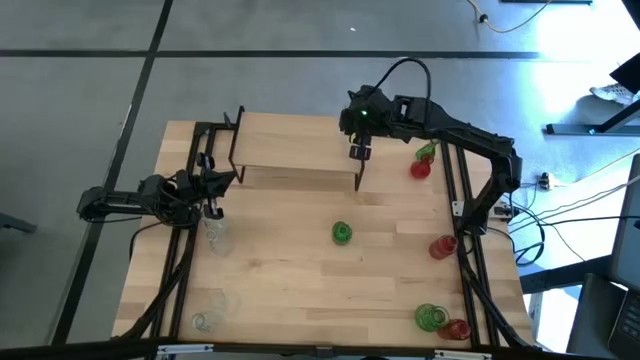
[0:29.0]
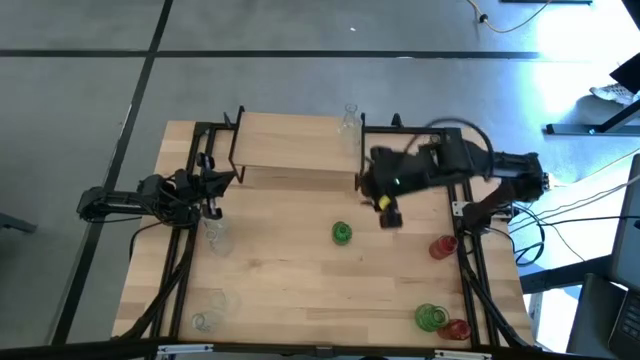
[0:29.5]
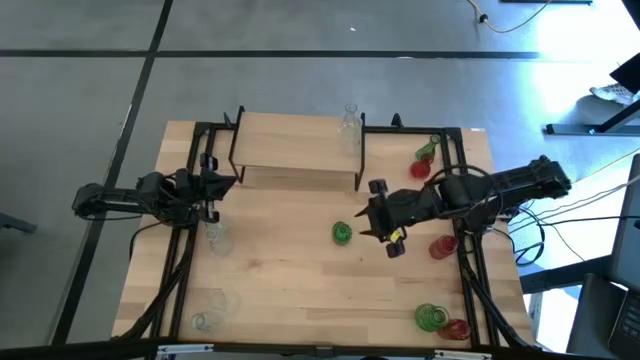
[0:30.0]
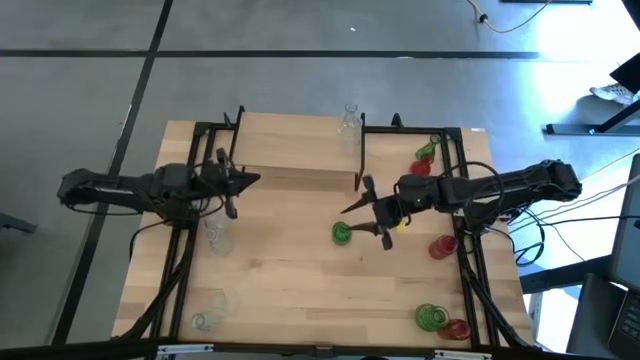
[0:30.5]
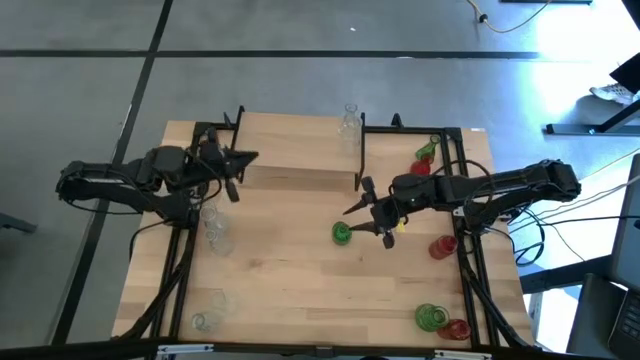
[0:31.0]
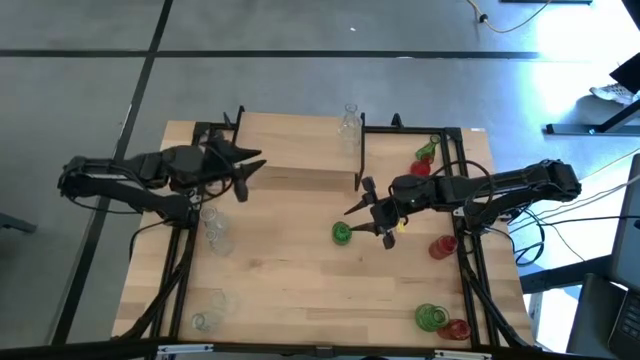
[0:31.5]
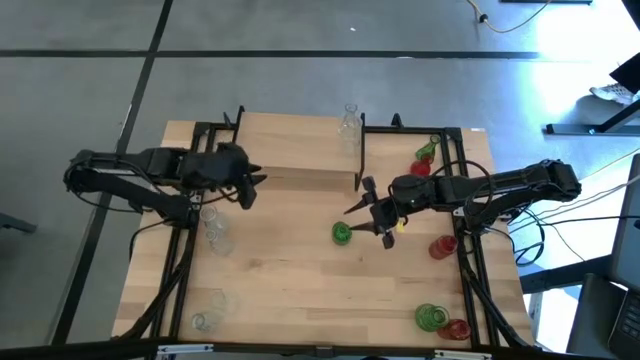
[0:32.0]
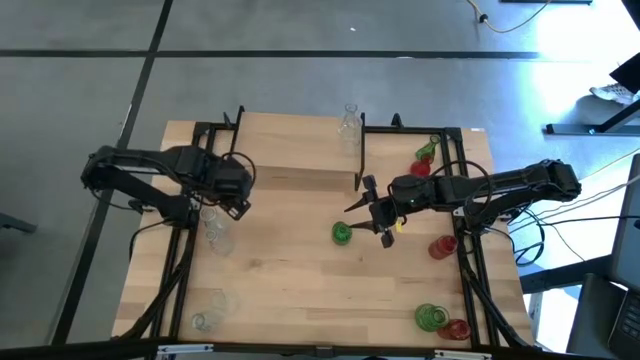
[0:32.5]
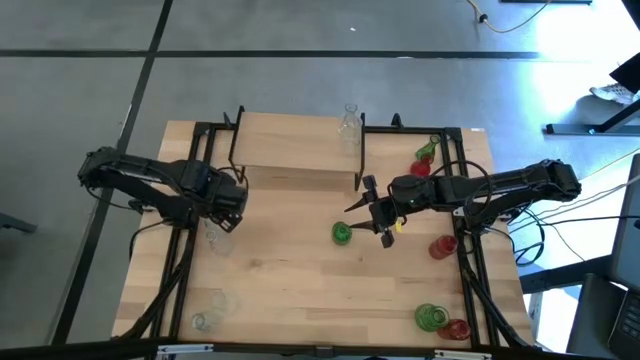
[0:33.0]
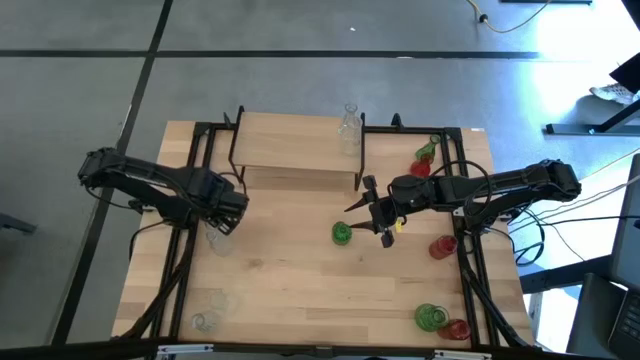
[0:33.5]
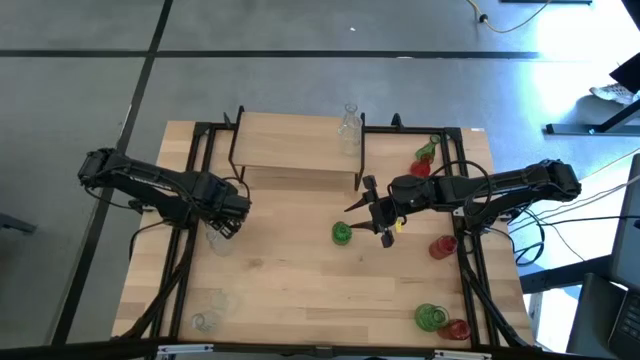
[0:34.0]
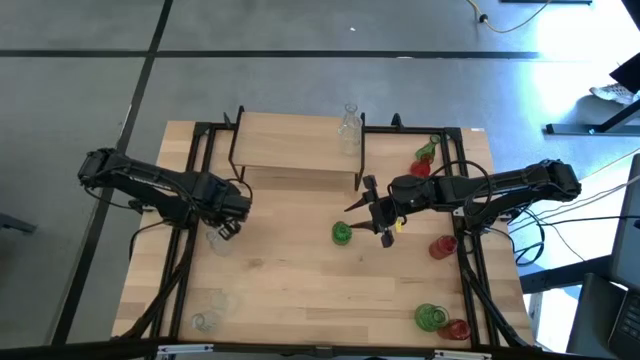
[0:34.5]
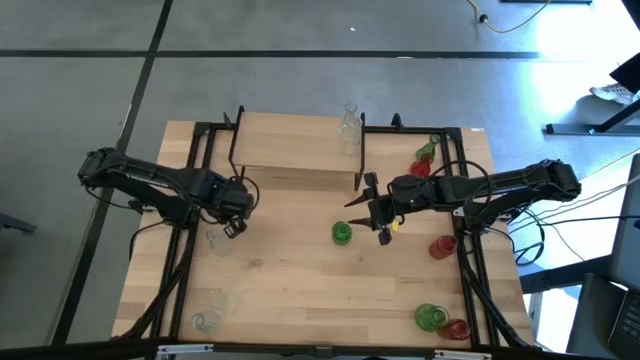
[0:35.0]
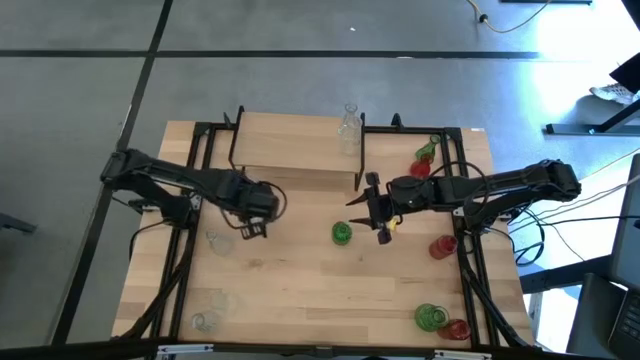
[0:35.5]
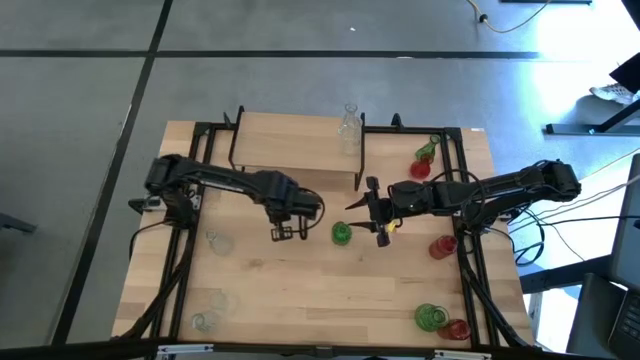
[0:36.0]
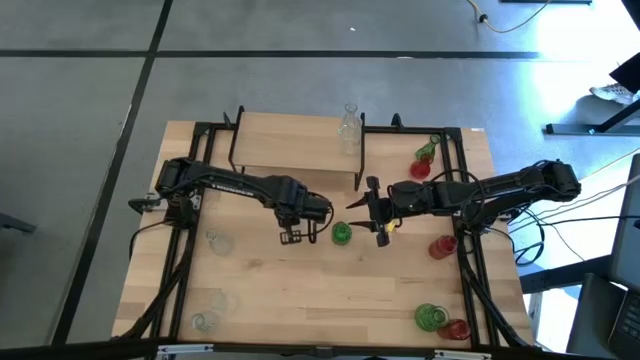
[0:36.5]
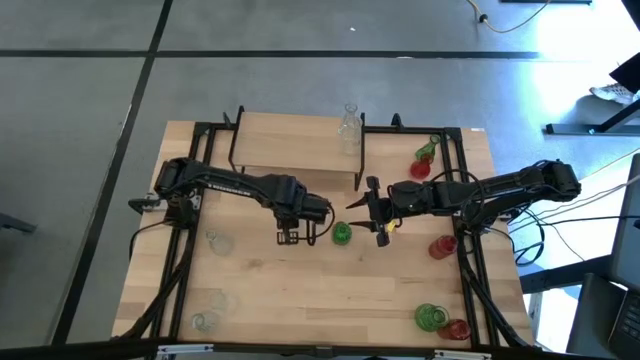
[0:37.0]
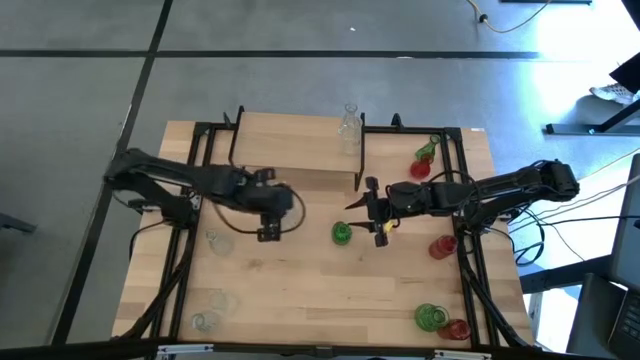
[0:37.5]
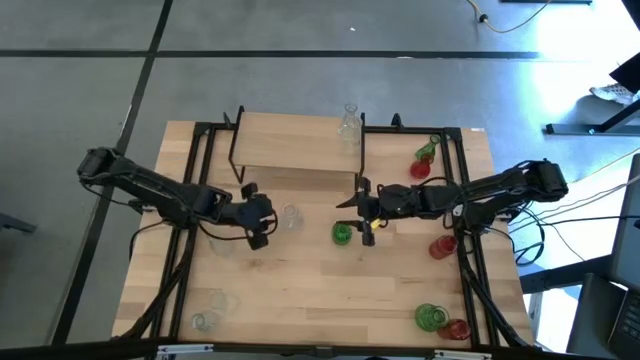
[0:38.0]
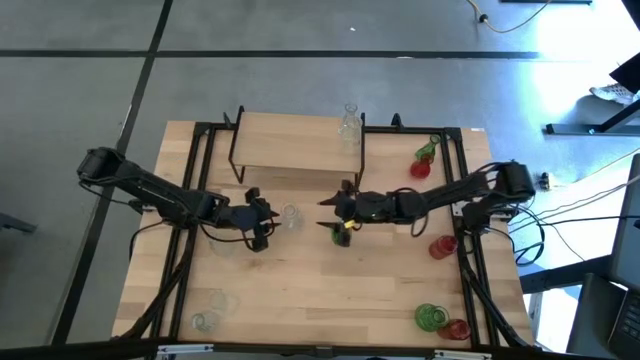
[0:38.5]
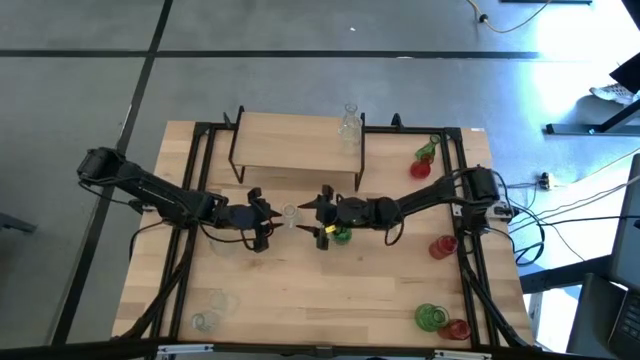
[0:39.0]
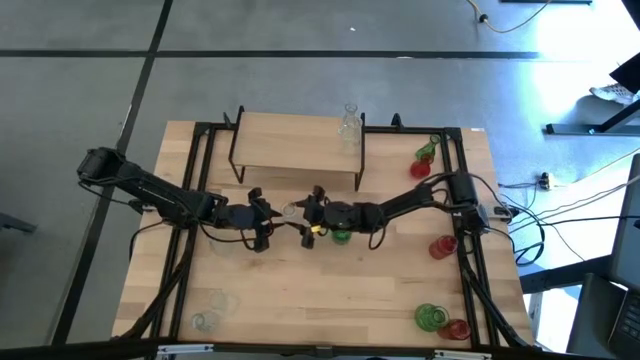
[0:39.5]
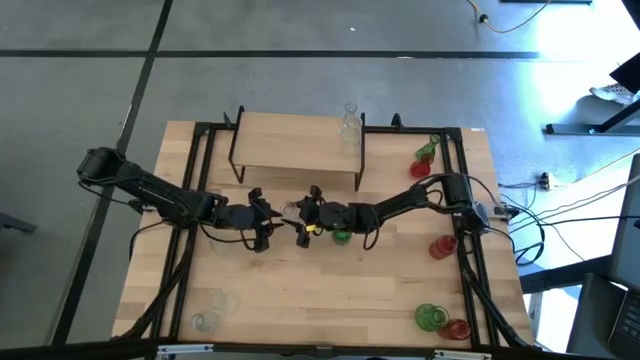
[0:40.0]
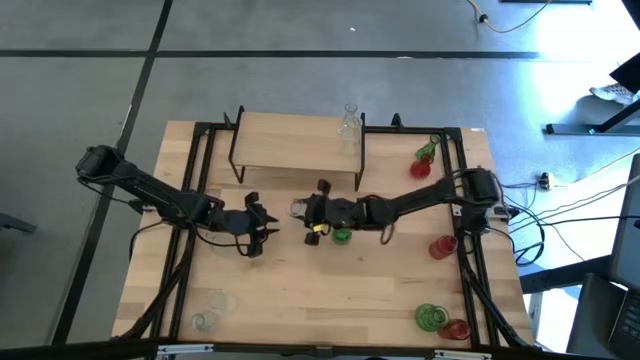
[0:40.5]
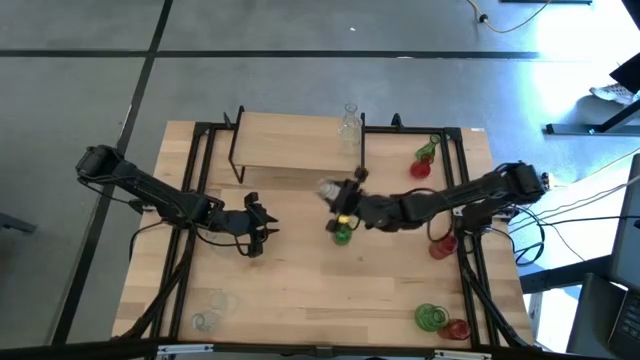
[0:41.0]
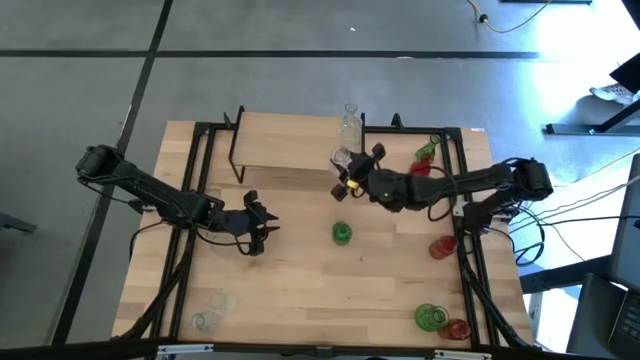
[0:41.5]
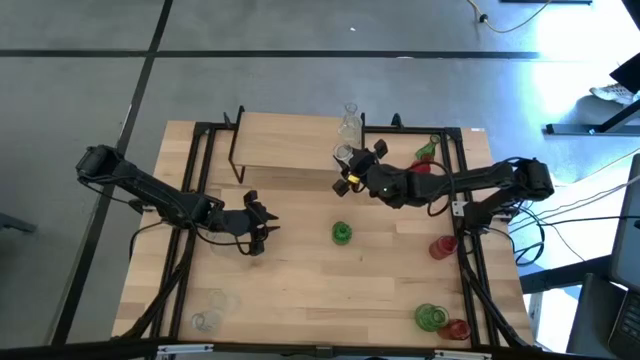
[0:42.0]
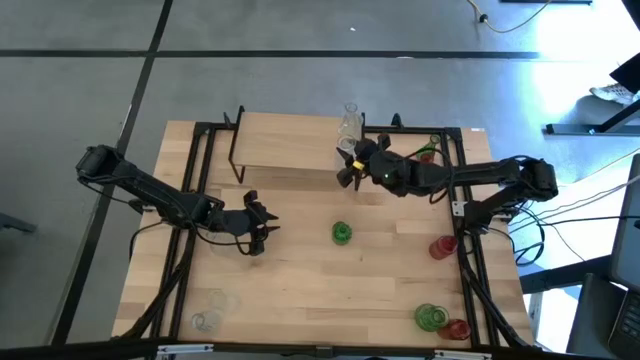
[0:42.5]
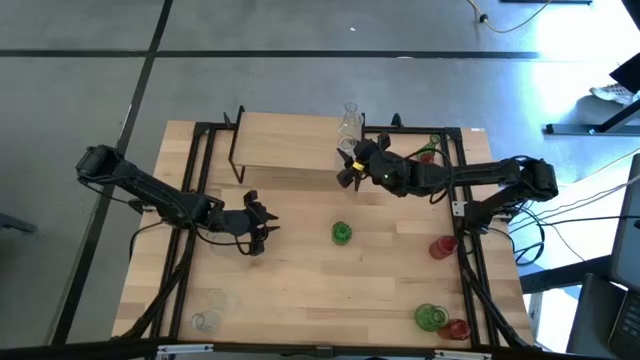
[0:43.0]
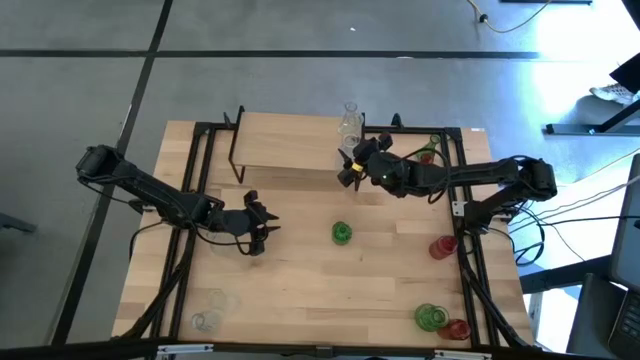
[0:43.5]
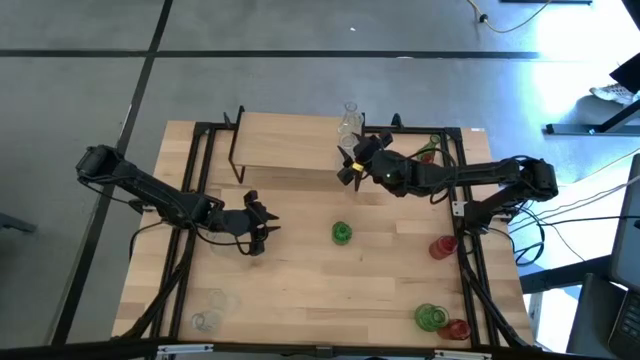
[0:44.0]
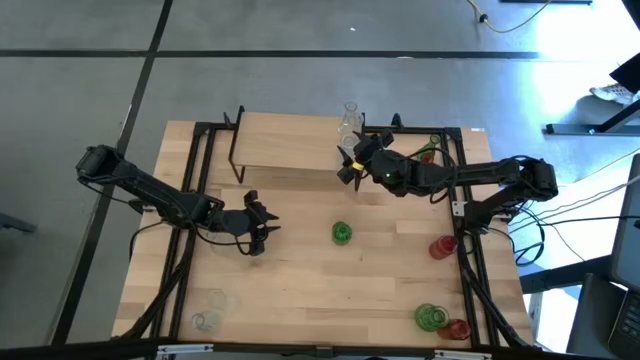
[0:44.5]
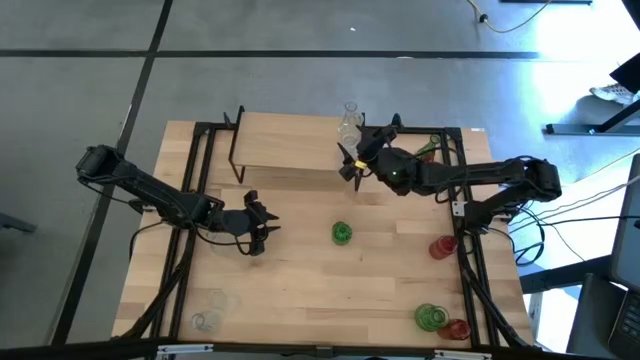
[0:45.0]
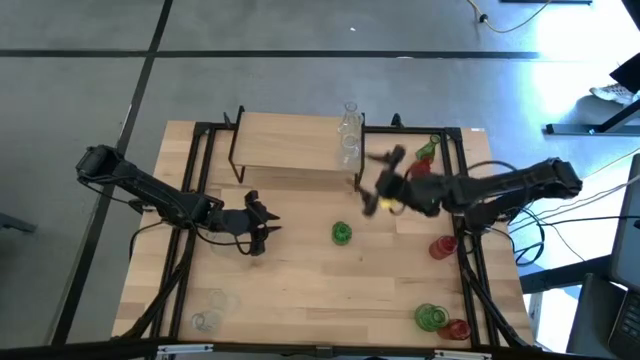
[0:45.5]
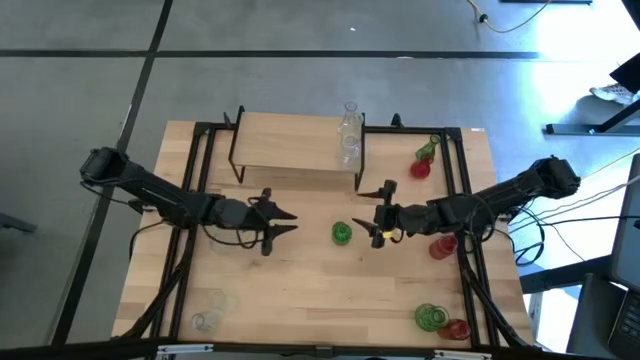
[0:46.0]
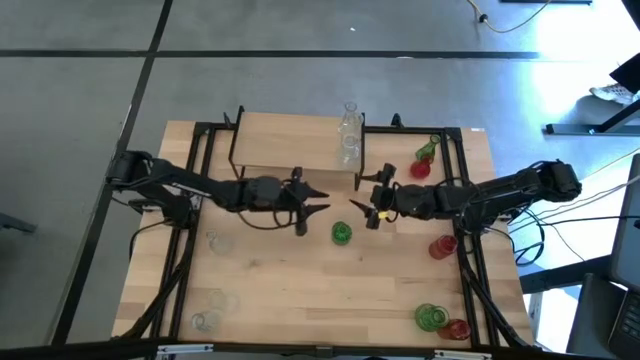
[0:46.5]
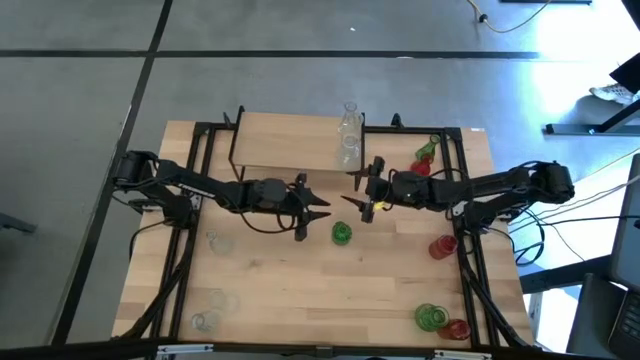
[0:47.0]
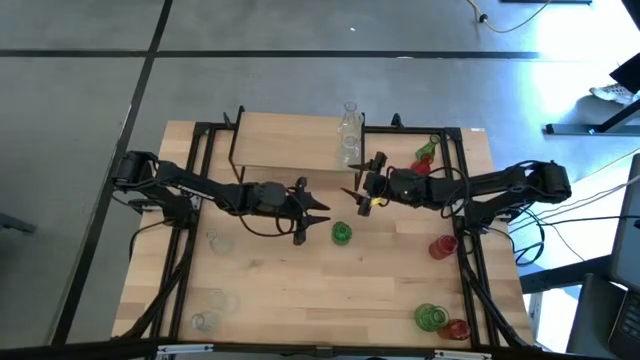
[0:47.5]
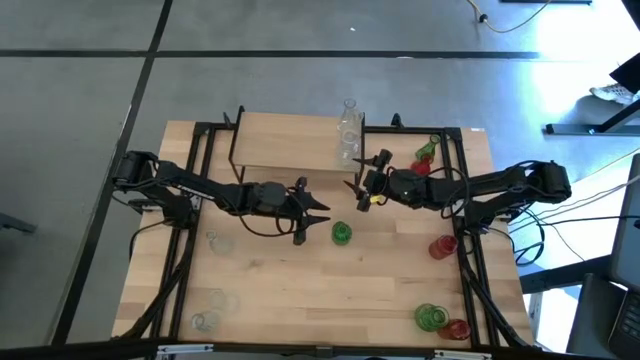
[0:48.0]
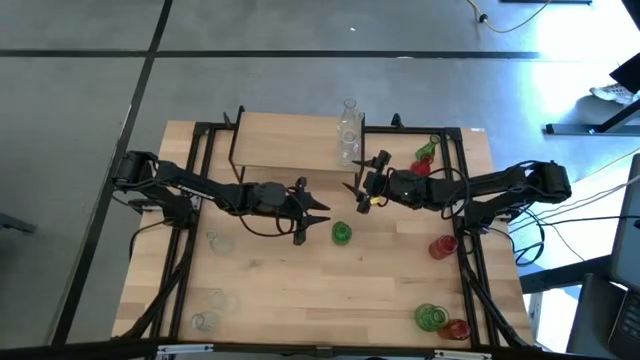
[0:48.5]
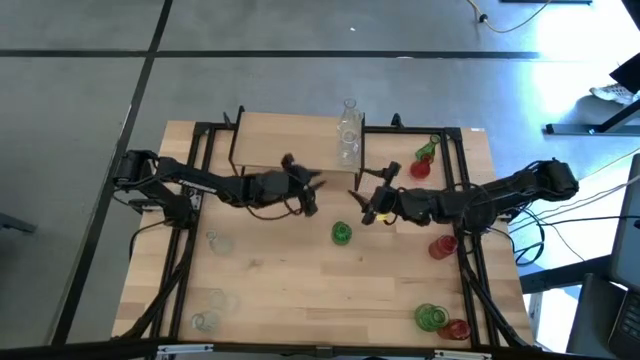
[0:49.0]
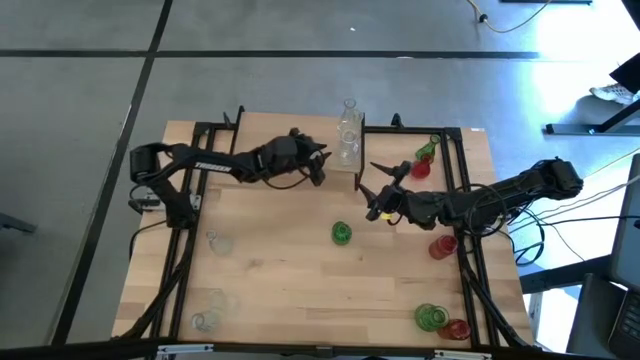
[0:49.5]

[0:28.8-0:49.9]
Task: sort vases onto shelf
Put the transparent vase aligned with the other transparent vases on the shelf

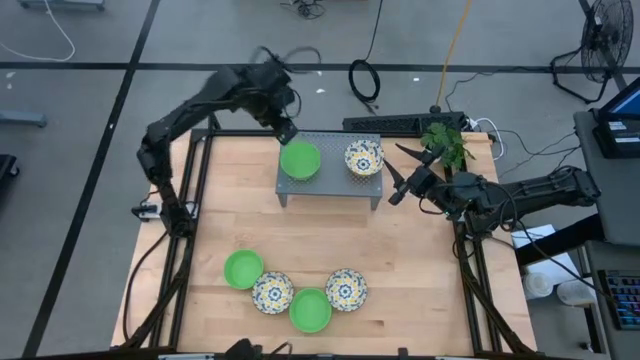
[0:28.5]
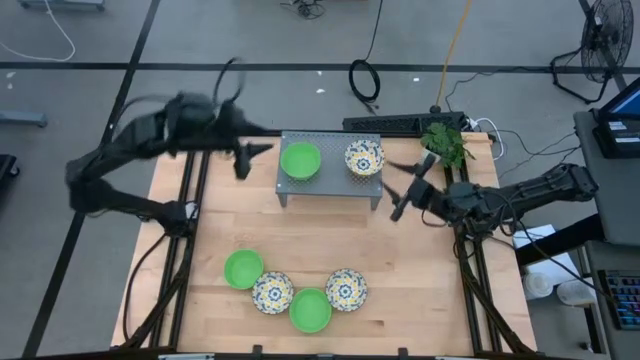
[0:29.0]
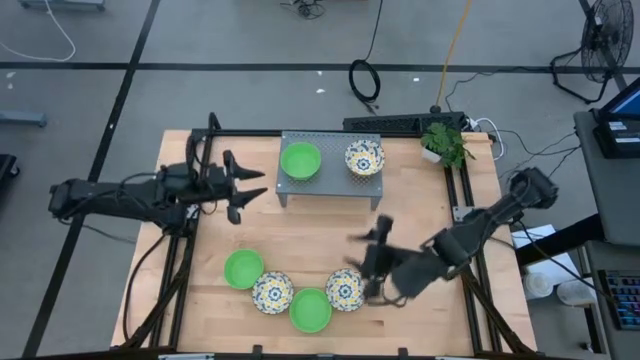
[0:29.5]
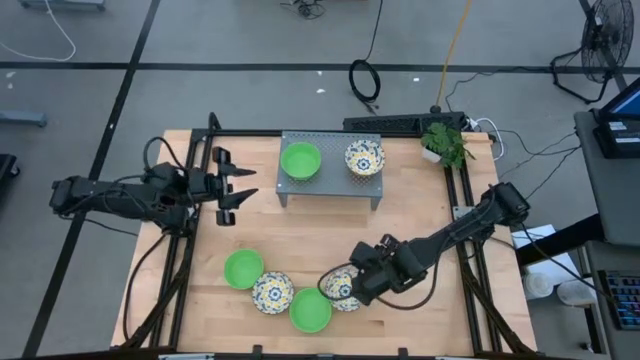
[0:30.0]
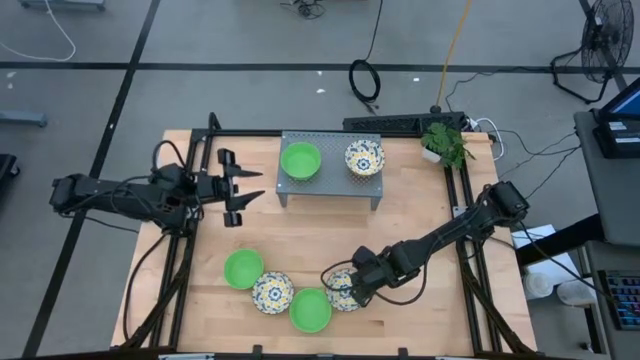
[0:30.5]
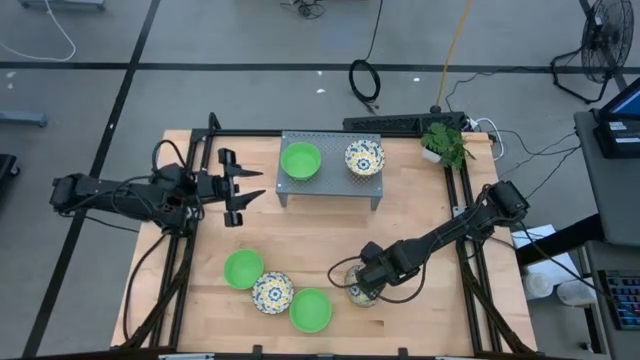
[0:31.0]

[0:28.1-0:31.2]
Task: Pick & Place Mini bowls
Stack the white patterned bowl on top of the white patterned bowl on the shelf
